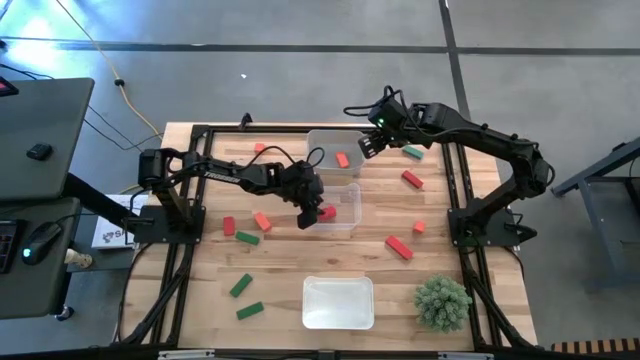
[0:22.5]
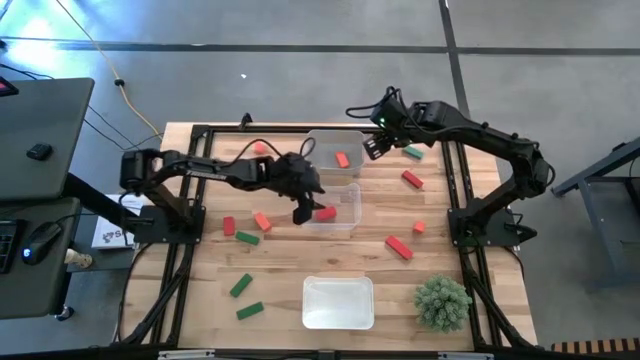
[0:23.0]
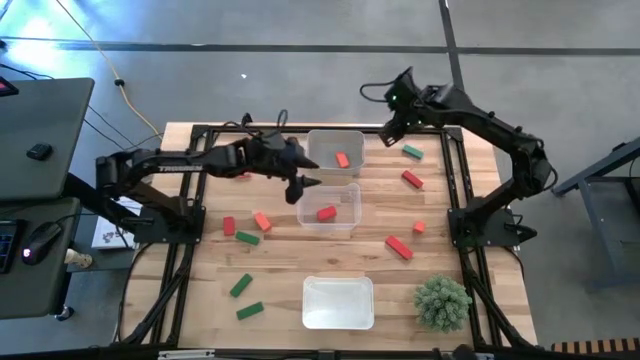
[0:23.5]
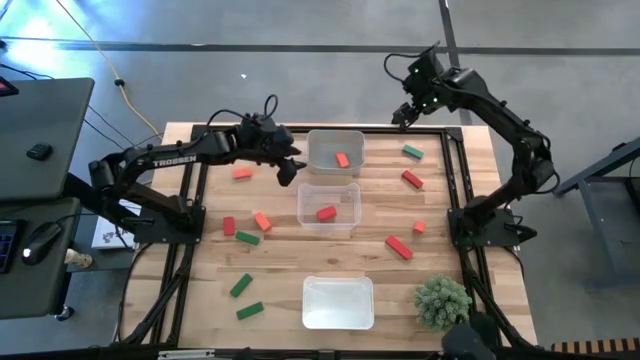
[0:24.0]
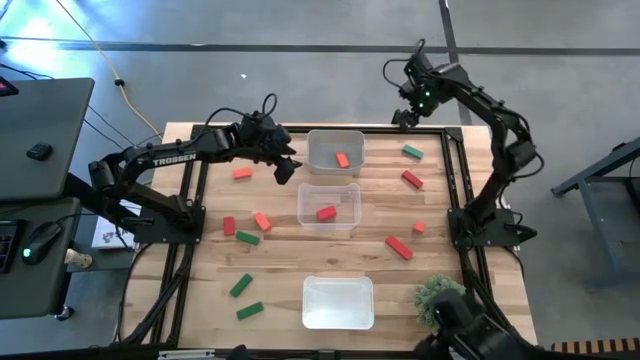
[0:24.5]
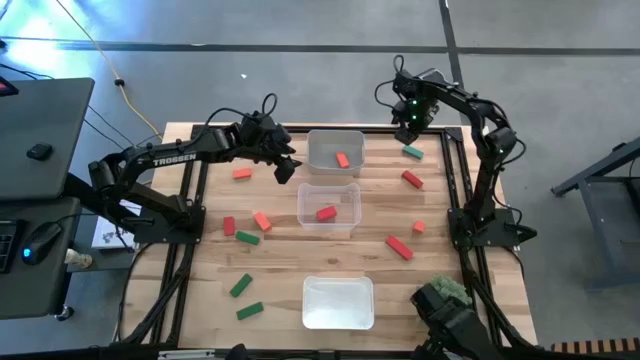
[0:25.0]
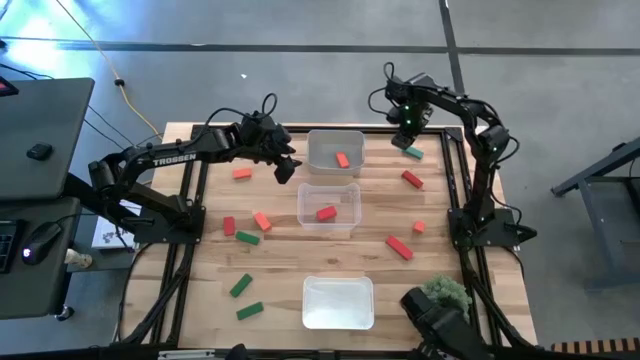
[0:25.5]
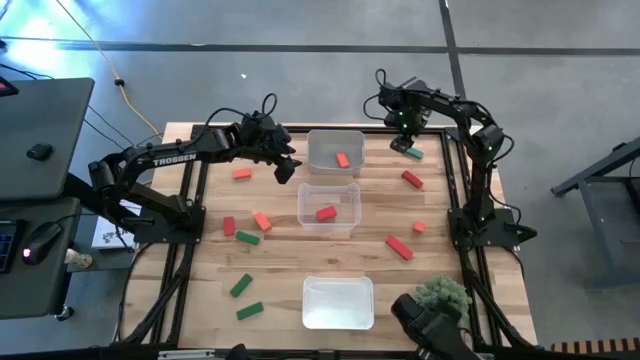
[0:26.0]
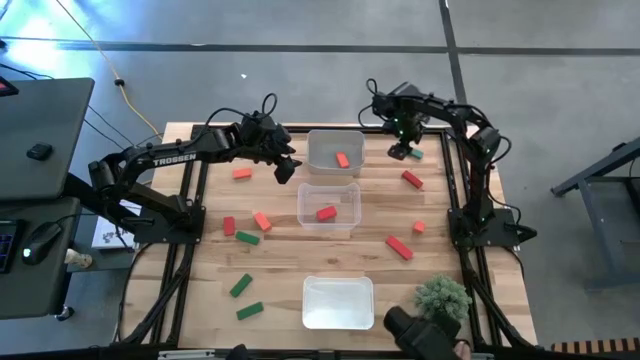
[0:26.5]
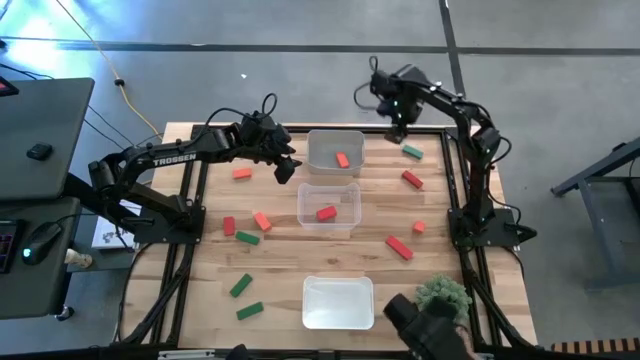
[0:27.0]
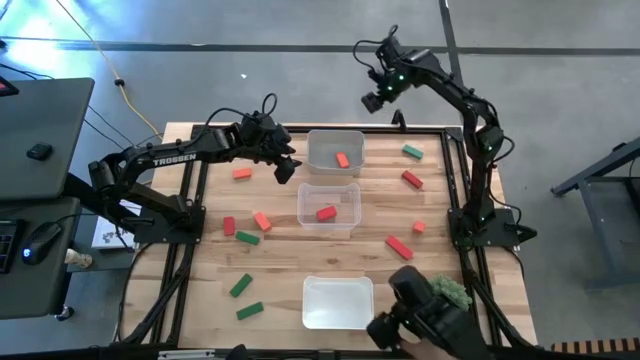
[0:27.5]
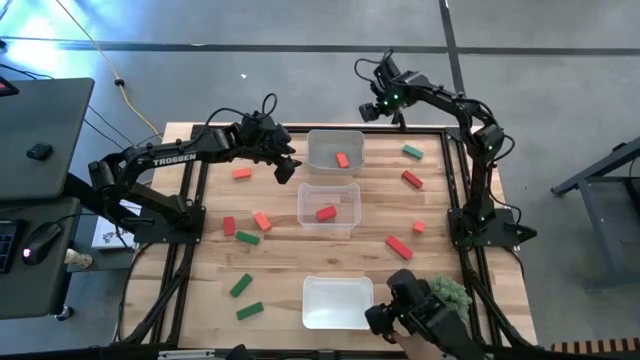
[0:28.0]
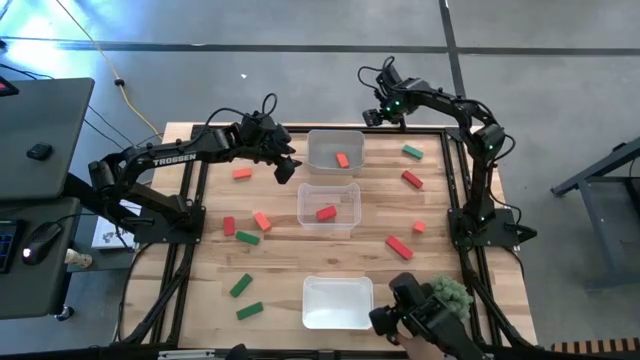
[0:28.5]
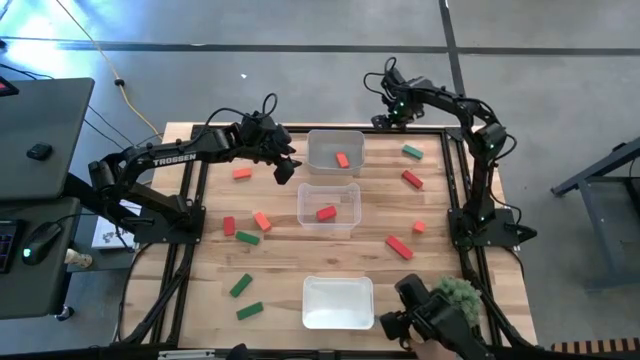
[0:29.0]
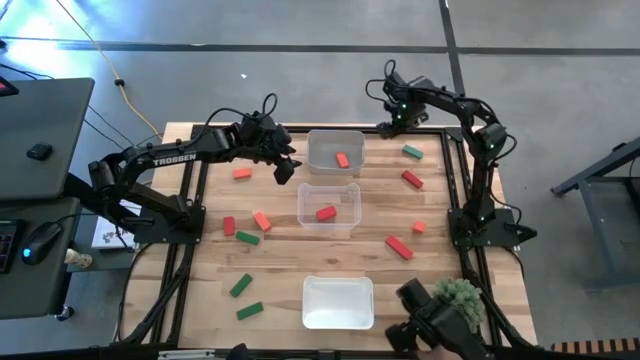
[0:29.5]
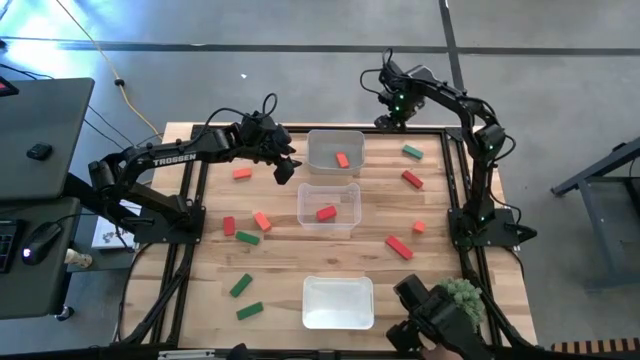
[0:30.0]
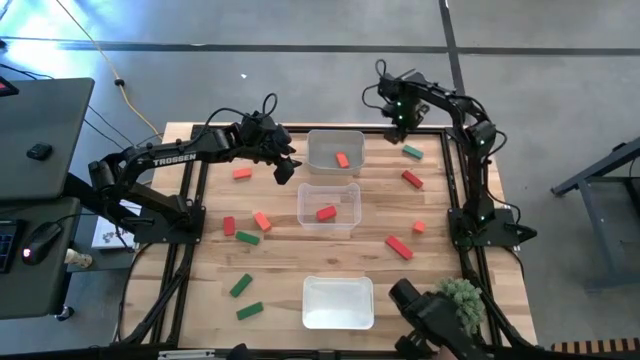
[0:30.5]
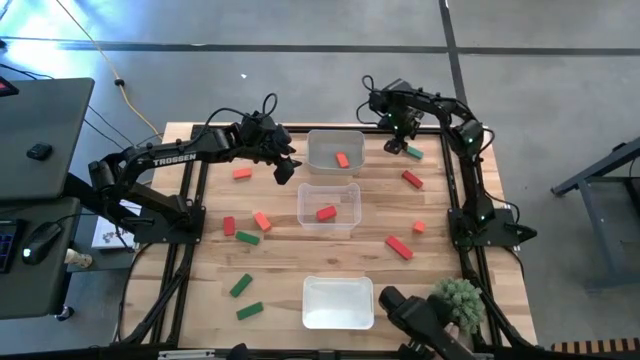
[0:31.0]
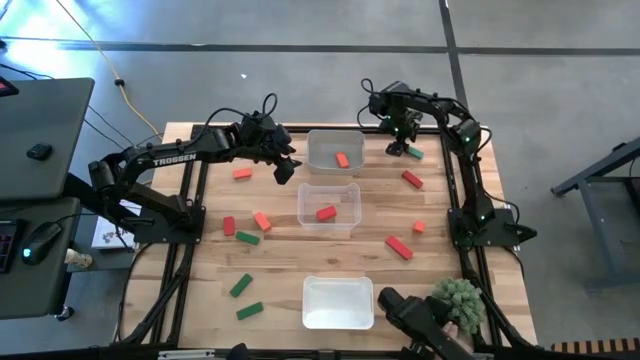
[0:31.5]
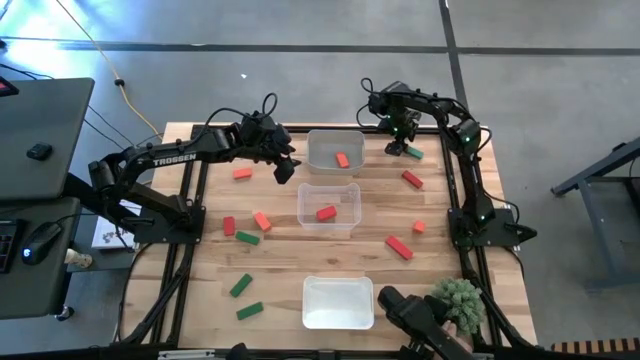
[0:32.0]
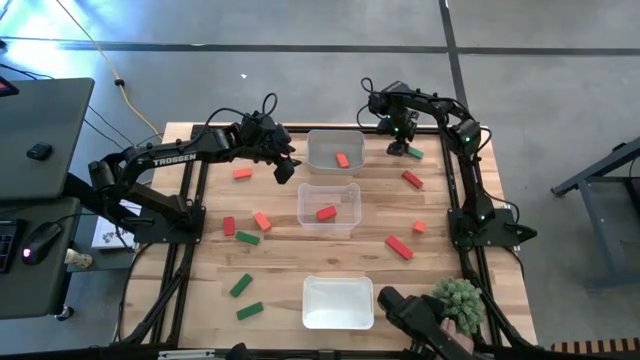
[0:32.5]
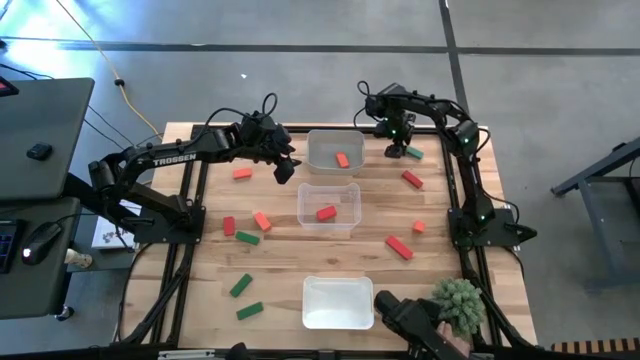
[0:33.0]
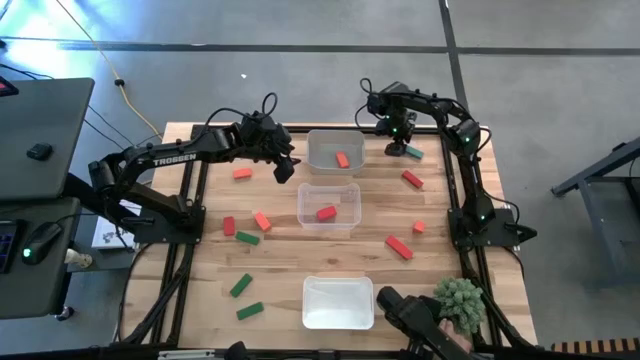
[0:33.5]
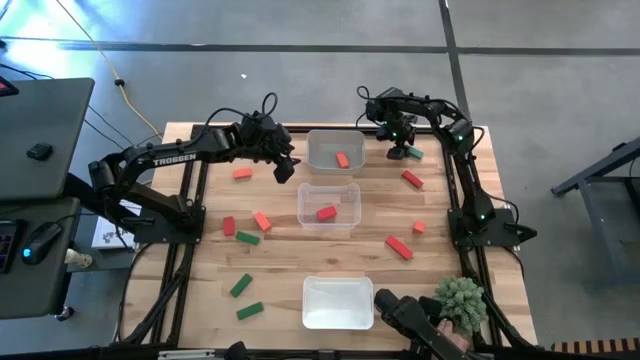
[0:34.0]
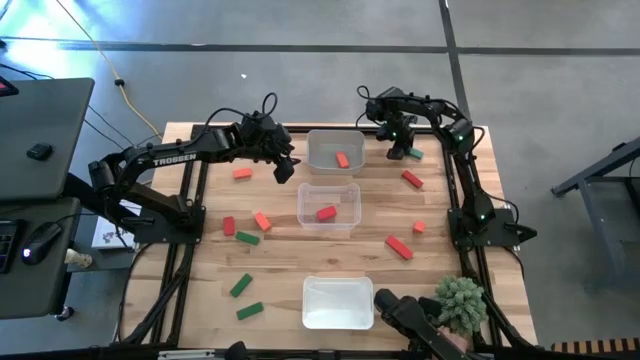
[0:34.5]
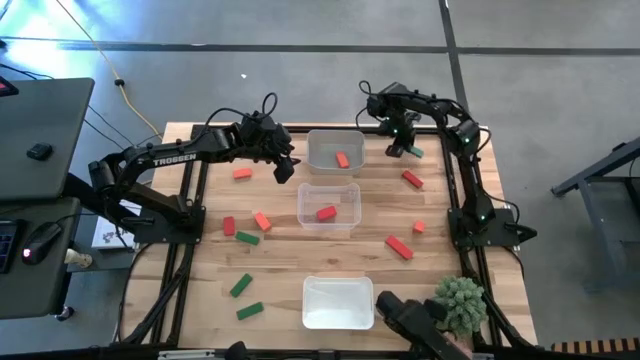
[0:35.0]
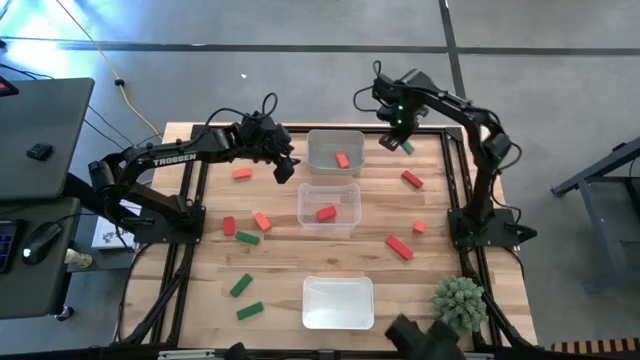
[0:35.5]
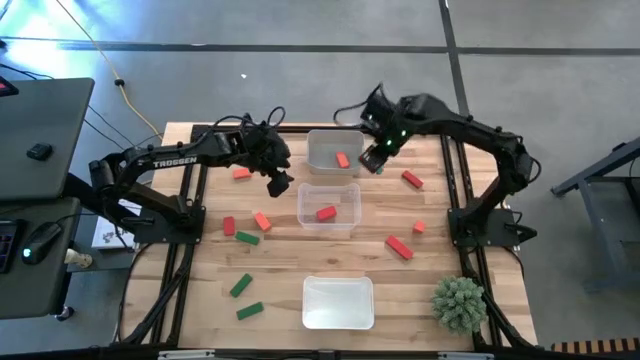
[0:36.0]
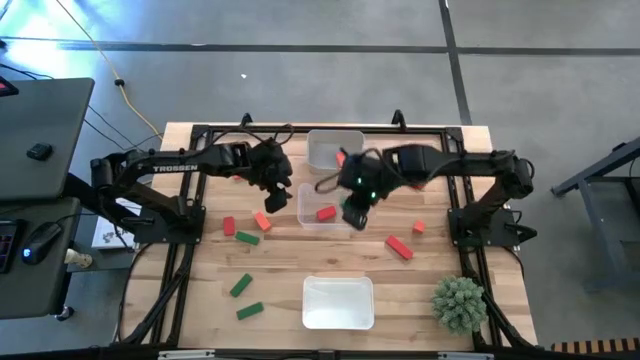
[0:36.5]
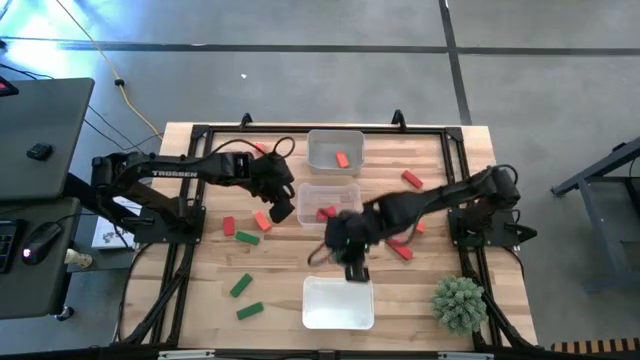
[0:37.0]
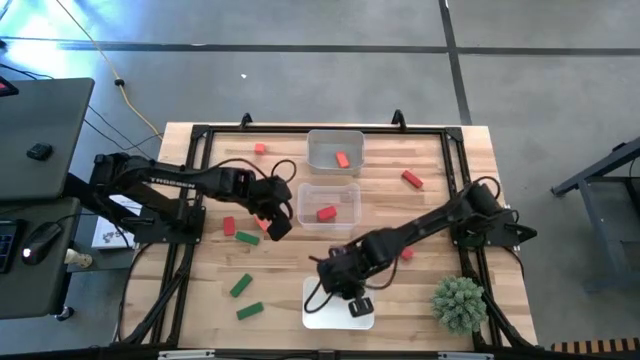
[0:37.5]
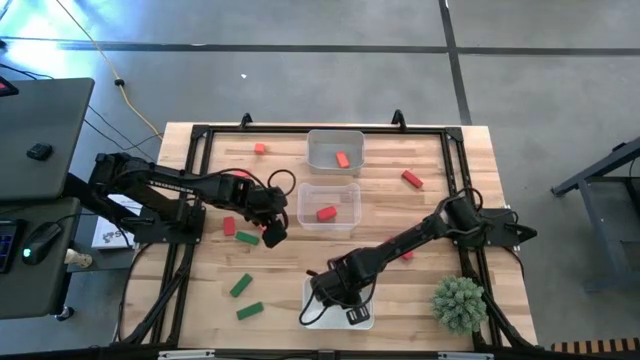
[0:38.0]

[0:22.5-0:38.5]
Task: Sort & place blocks by color
Put the green block into the white bin

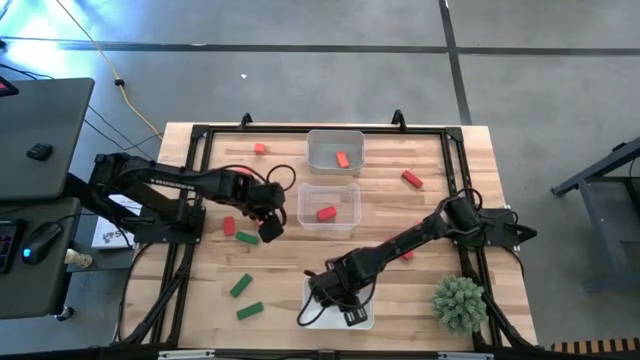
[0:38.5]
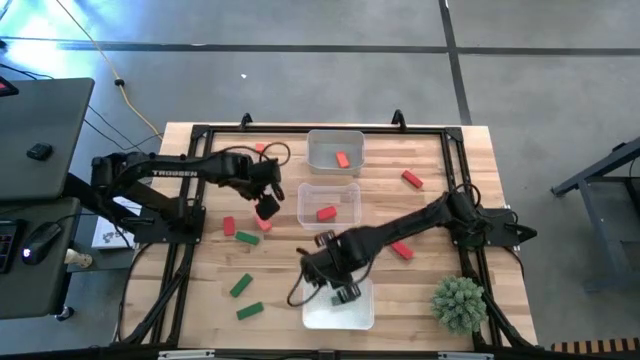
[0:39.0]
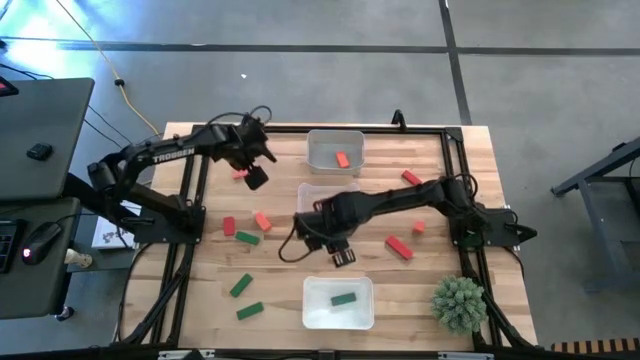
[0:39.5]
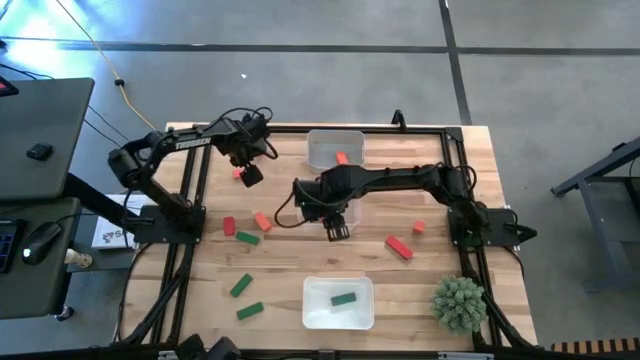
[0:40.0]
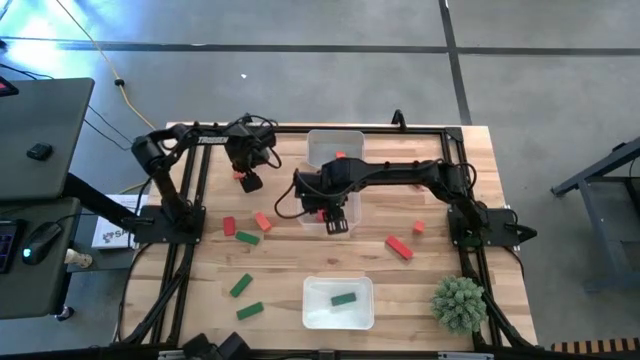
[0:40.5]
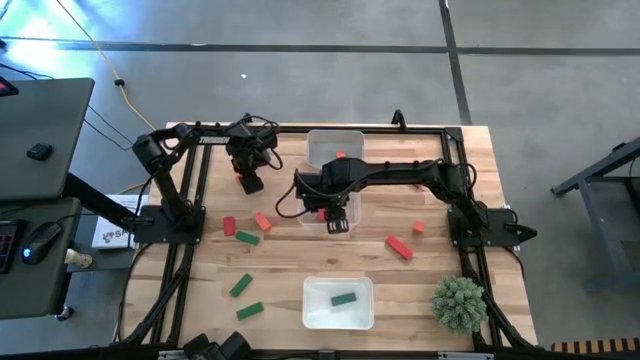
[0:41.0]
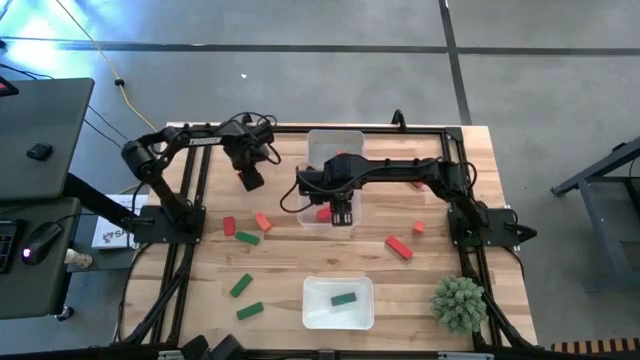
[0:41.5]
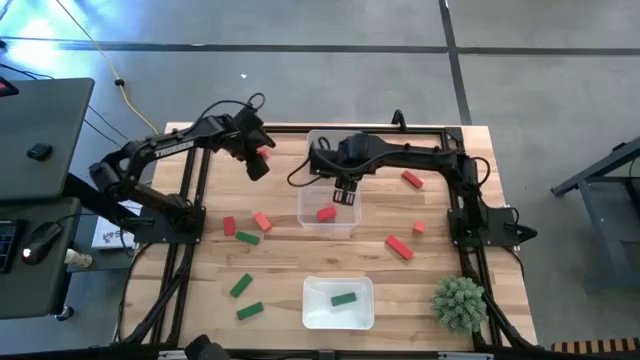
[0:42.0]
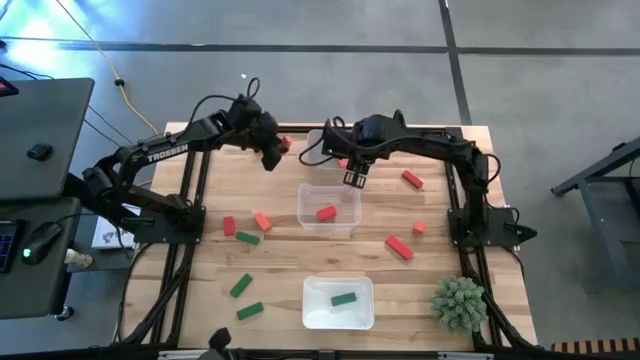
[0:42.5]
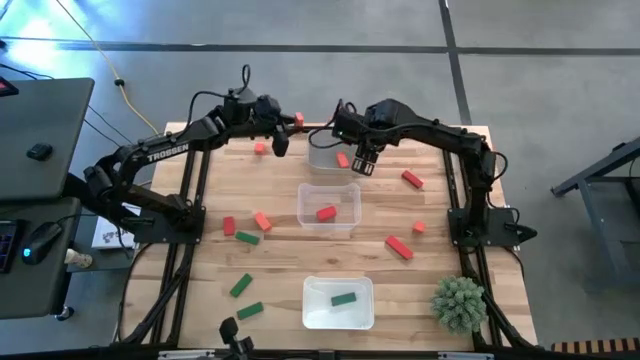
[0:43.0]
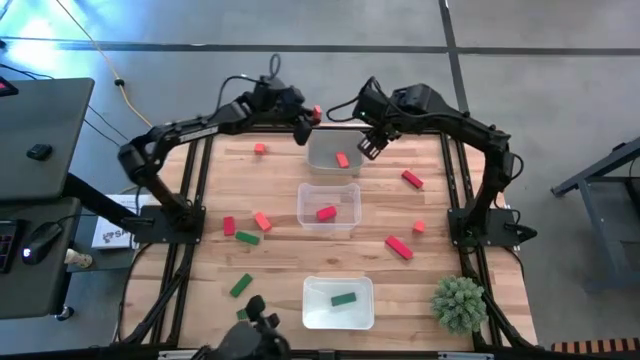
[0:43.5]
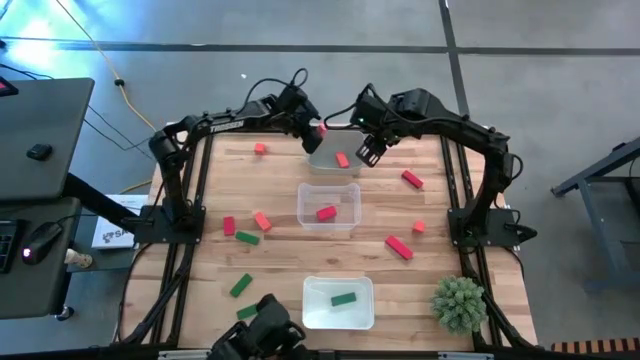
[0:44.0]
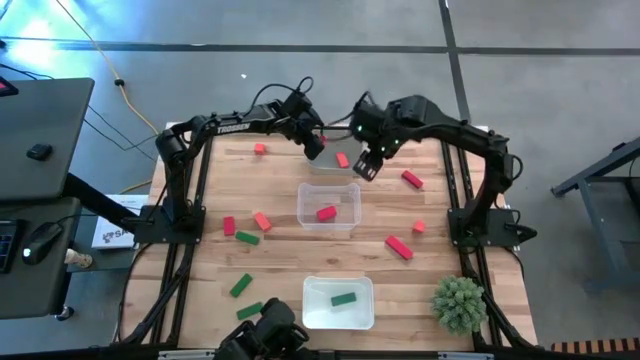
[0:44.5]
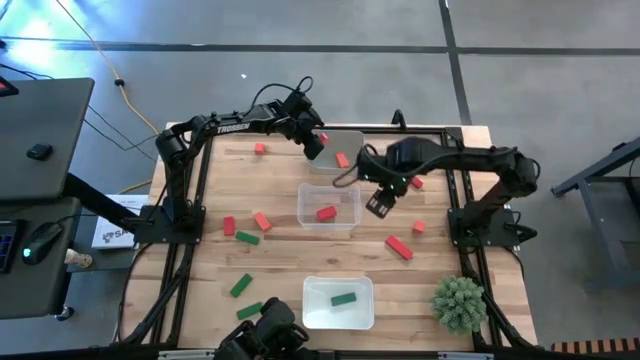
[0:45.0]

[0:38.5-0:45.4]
Put the orange block into the gray bin
